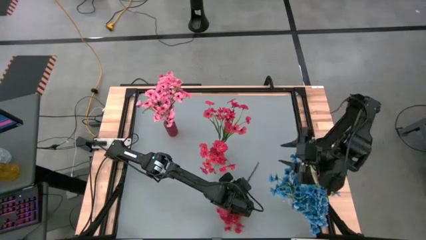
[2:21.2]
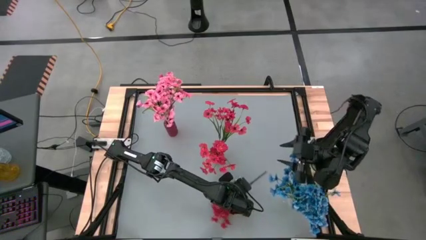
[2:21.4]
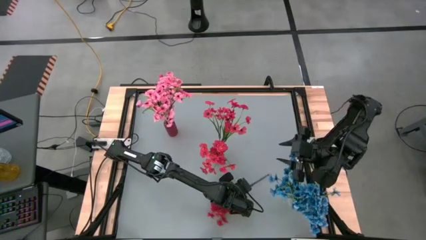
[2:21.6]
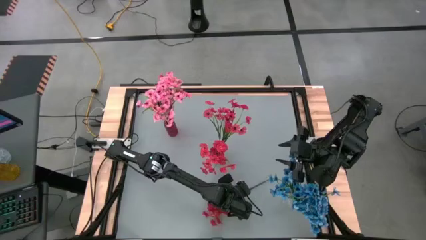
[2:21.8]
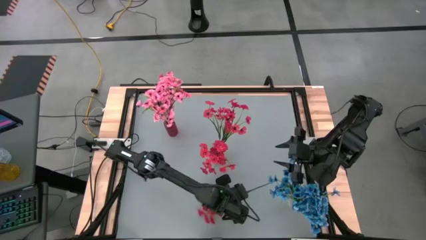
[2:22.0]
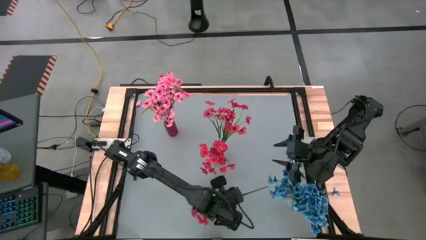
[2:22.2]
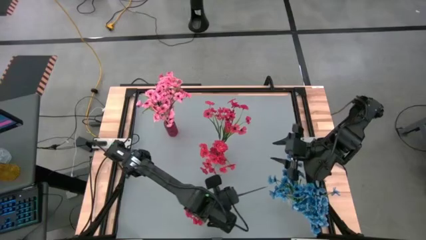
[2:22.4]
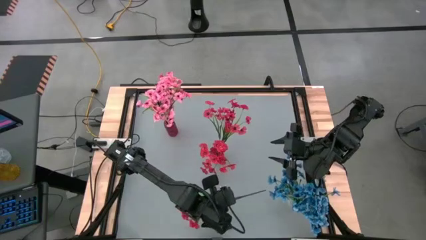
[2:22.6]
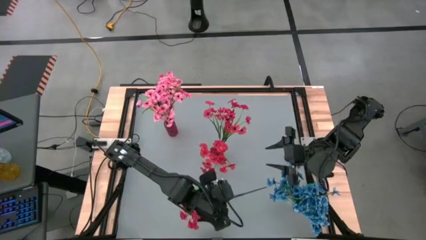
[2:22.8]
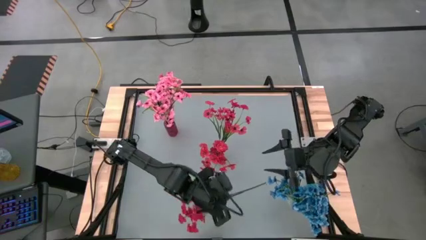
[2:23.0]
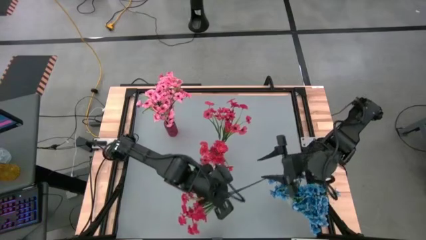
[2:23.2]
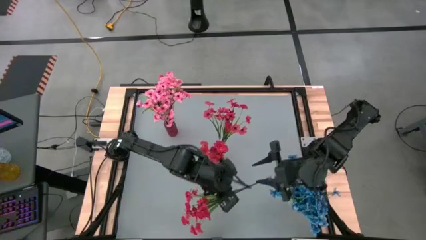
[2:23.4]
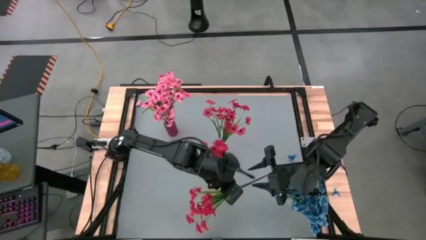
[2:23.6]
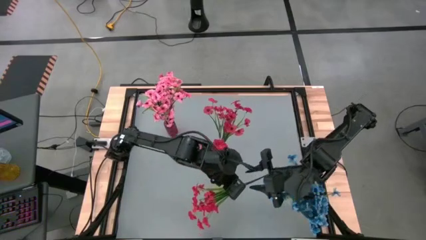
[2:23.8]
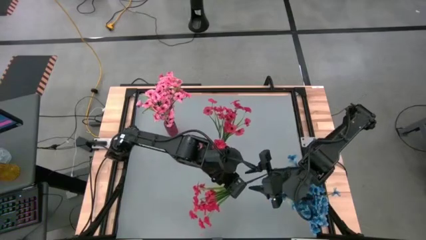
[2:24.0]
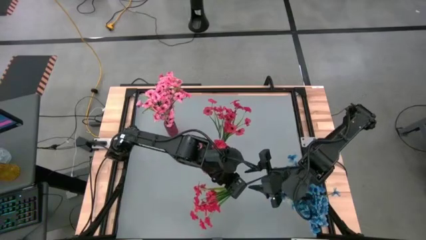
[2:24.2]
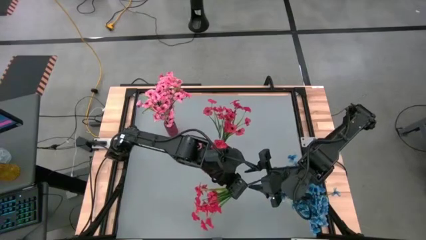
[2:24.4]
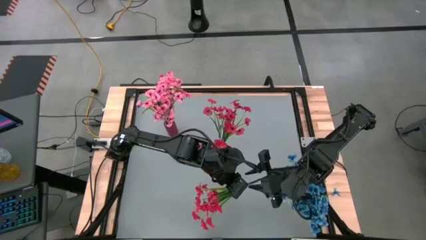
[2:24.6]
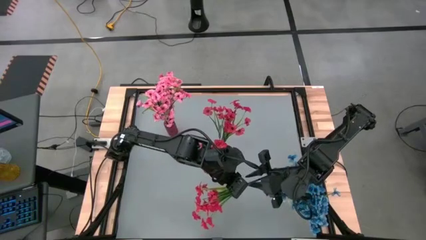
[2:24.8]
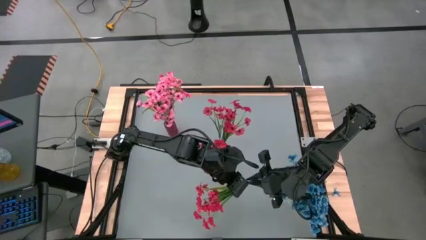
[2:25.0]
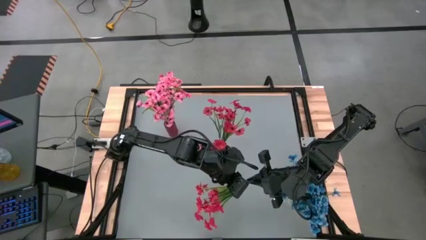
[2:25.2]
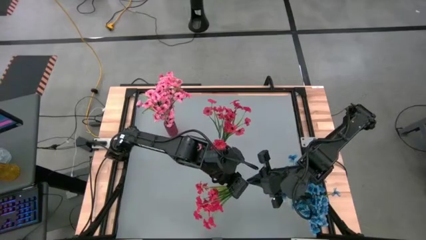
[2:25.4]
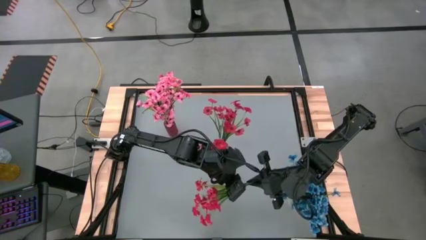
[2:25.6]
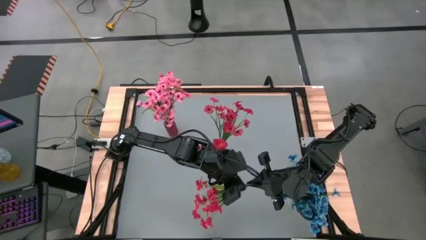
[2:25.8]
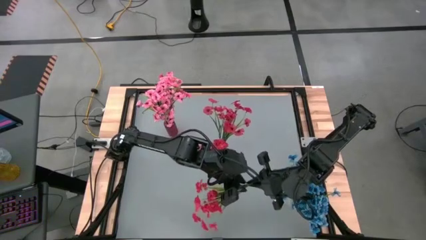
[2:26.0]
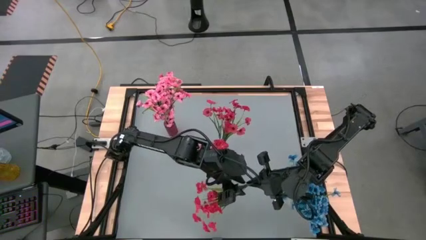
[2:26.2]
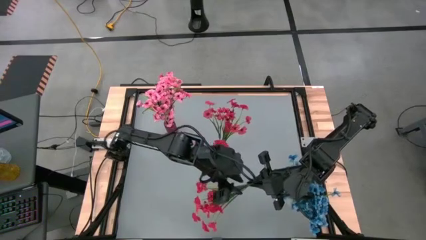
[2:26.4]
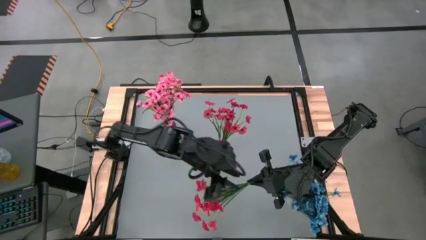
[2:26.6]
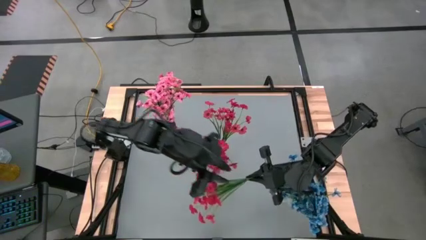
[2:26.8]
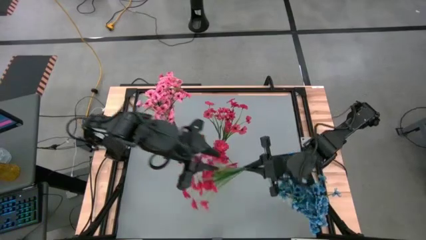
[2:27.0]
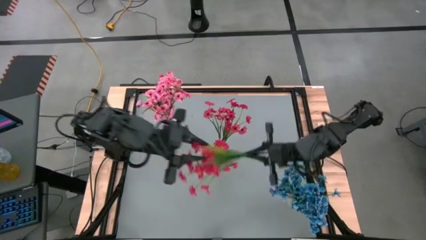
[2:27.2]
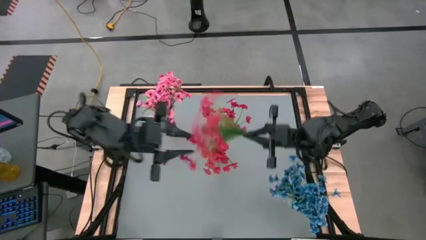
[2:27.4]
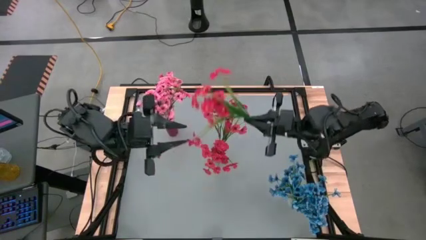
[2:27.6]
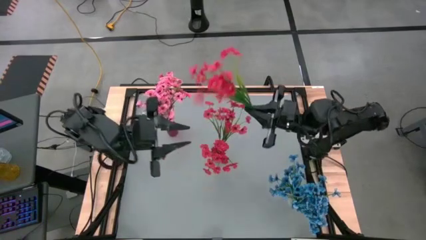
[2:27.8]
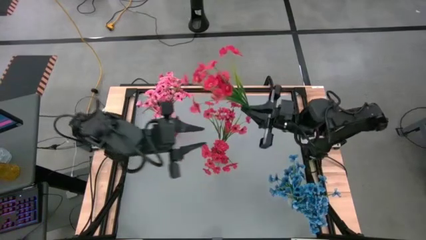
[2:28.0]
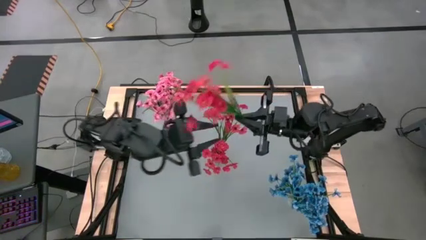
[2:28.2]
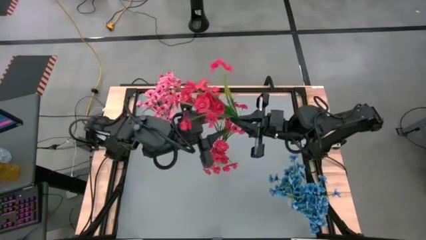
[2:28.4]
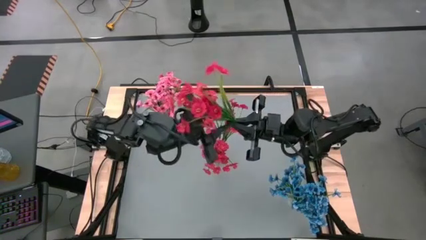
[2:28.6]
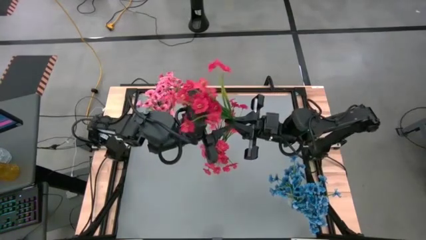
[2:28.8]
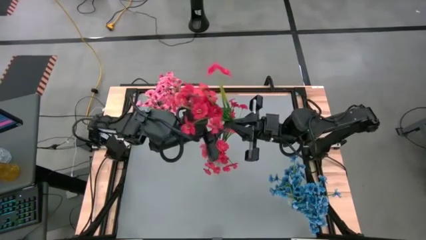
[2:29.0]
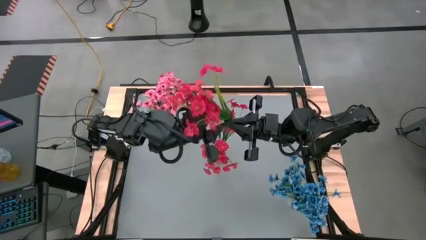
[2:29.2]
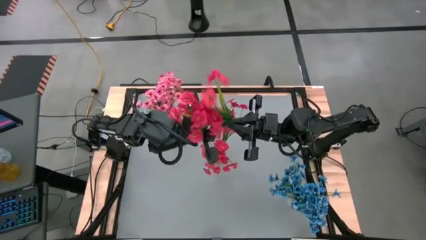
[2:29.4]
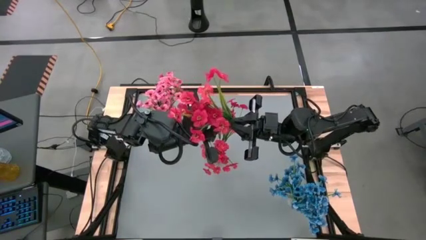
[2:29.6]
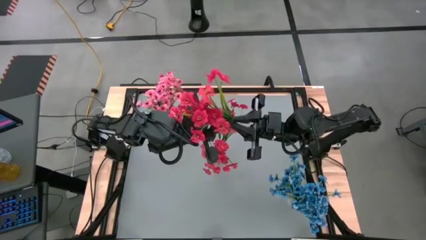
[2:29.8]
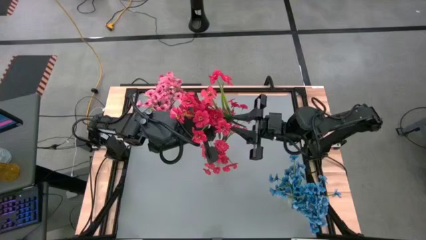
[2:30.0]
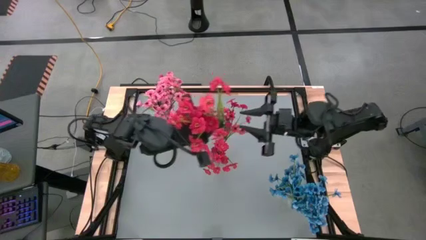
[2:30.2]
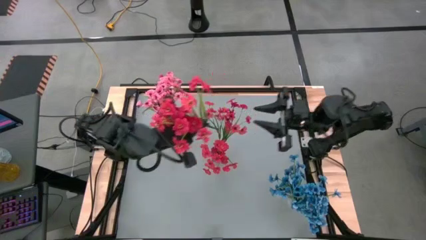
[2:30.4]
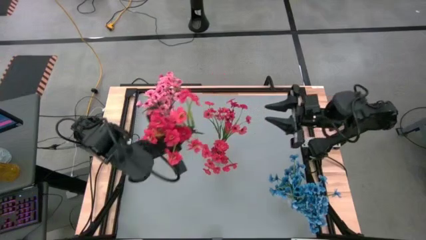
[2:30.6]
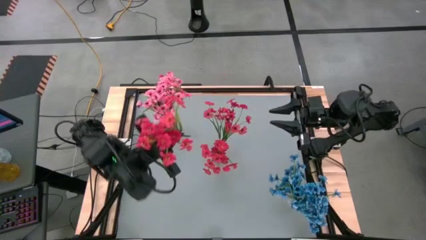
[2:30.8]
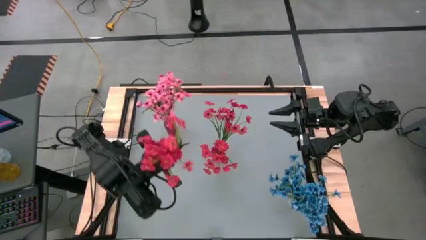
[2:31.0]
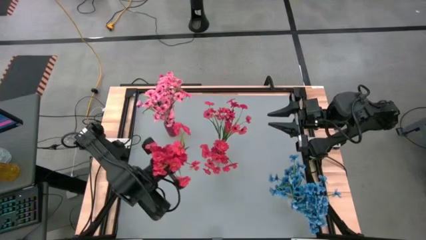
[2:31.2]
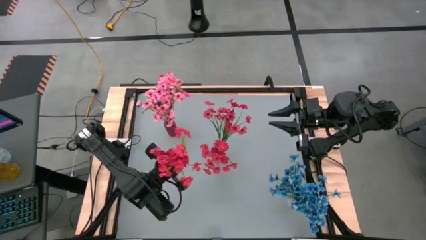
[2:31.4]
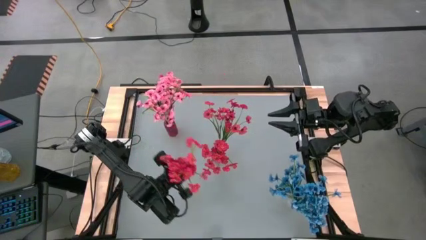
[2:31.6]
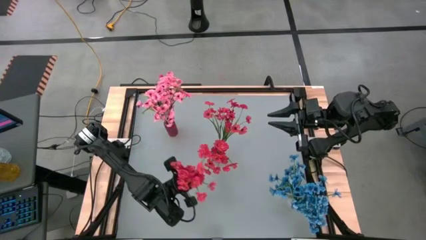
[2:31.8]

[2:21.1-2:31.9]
Task: Sort flowers into vase by color
Put the red flowers into the pink vase

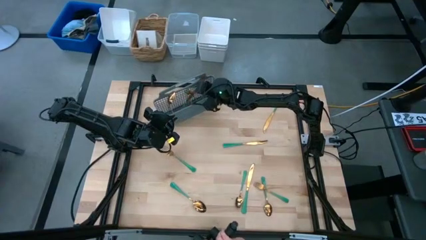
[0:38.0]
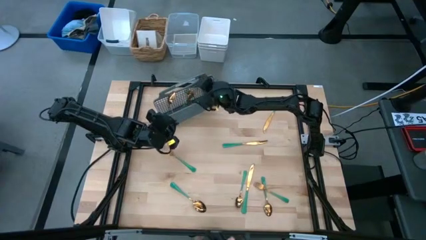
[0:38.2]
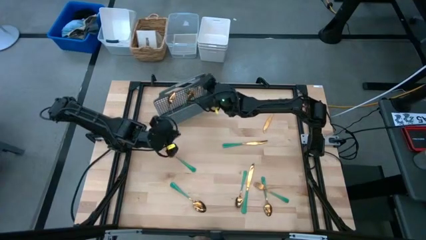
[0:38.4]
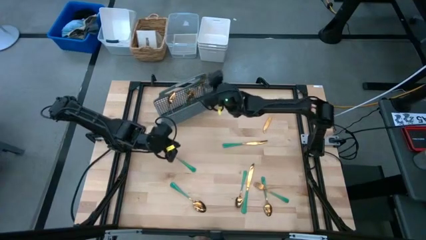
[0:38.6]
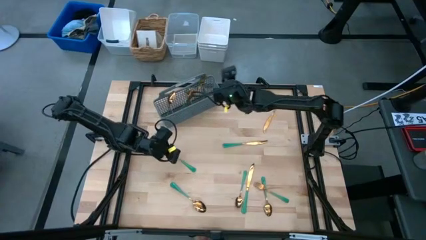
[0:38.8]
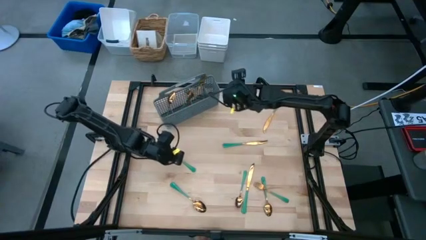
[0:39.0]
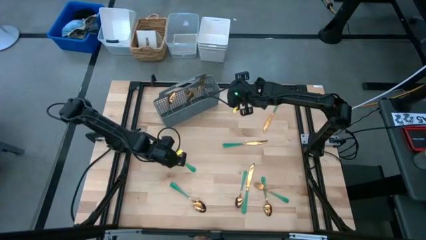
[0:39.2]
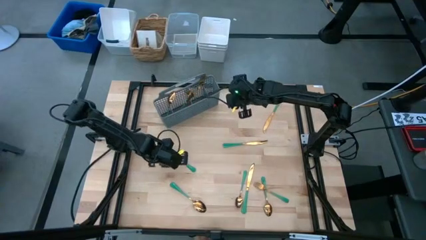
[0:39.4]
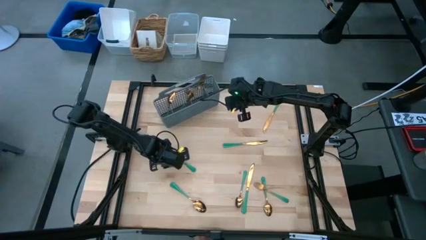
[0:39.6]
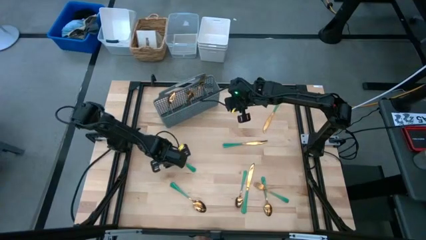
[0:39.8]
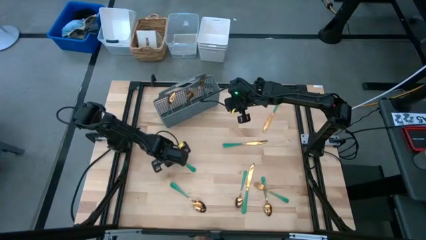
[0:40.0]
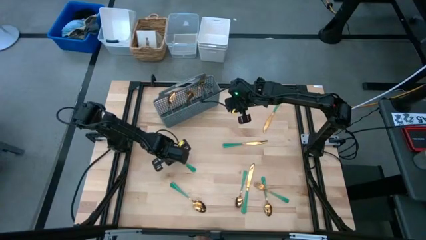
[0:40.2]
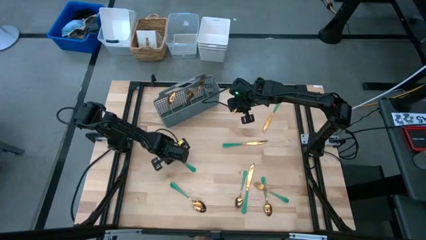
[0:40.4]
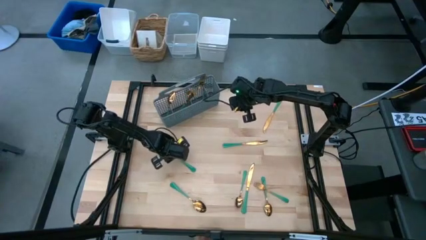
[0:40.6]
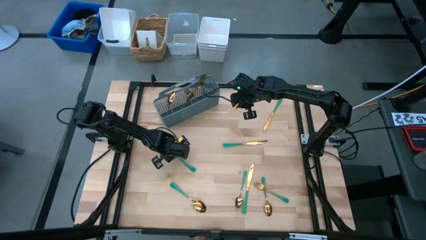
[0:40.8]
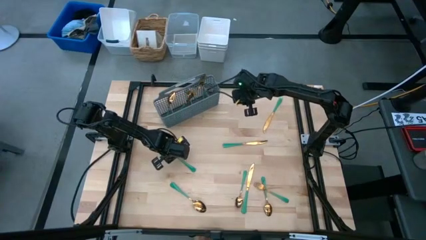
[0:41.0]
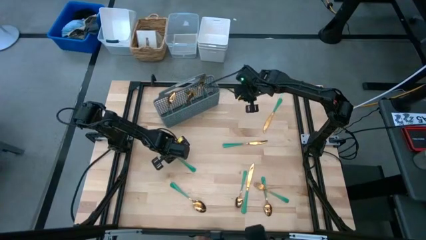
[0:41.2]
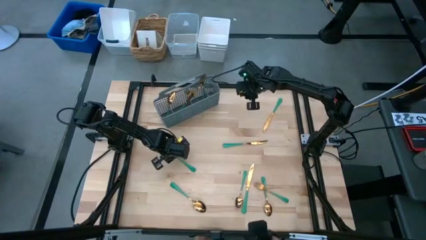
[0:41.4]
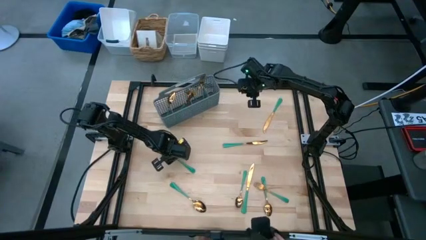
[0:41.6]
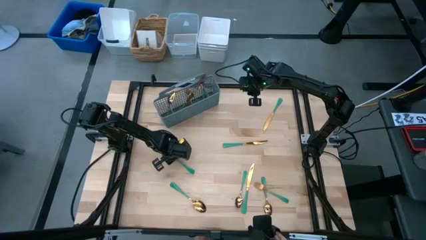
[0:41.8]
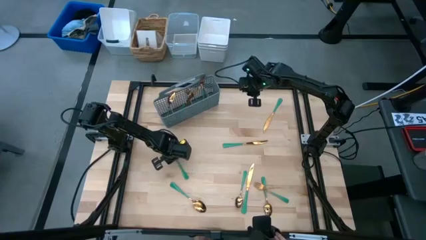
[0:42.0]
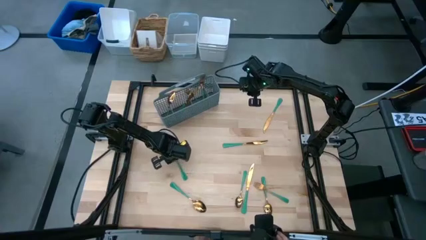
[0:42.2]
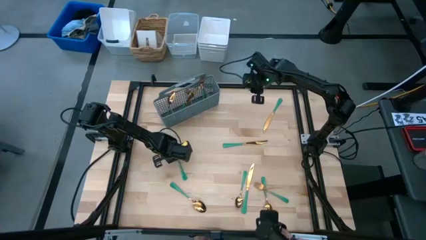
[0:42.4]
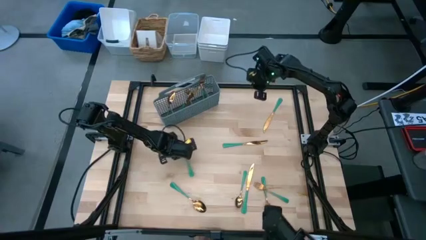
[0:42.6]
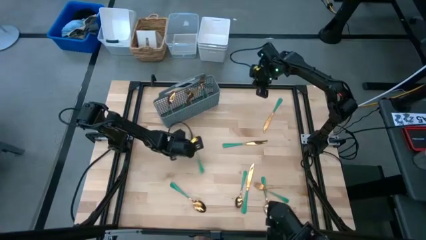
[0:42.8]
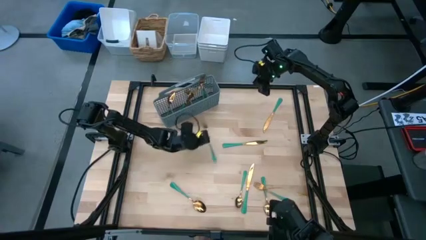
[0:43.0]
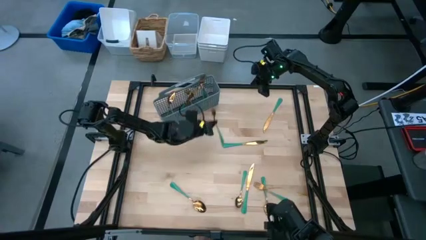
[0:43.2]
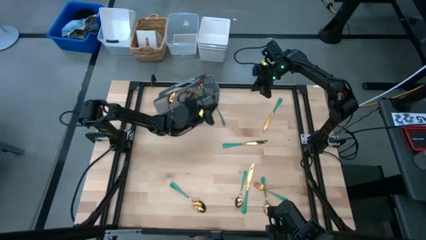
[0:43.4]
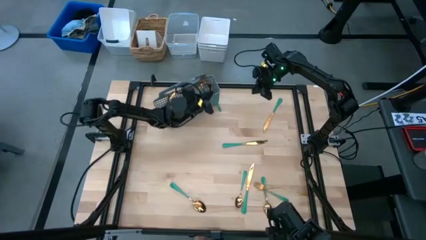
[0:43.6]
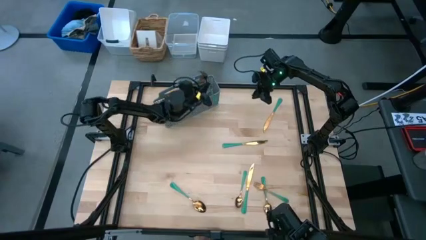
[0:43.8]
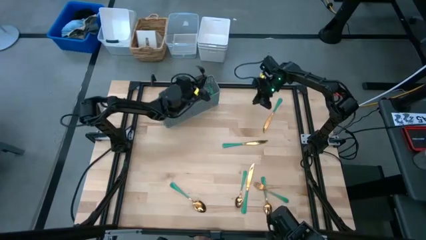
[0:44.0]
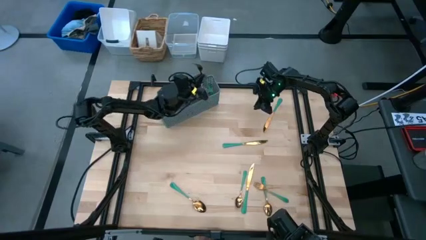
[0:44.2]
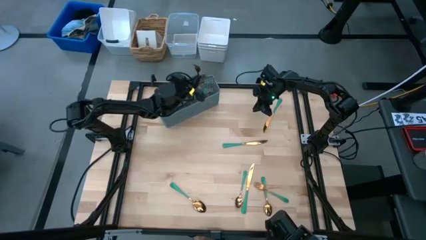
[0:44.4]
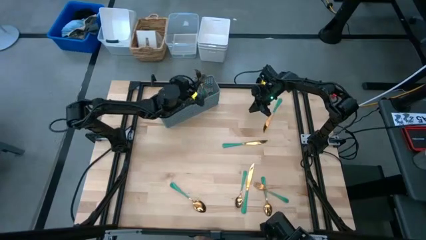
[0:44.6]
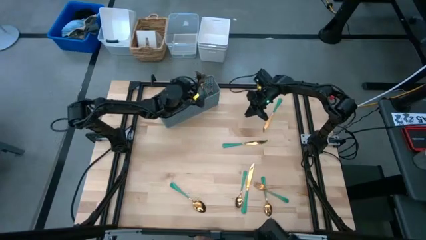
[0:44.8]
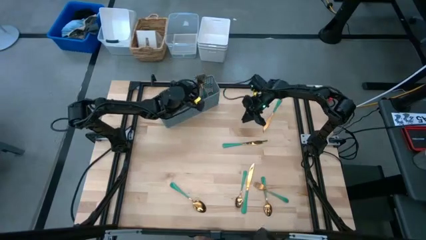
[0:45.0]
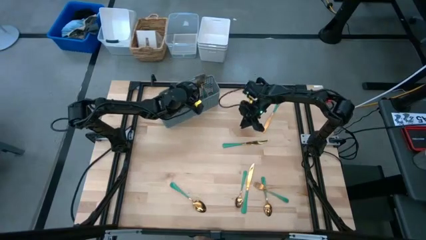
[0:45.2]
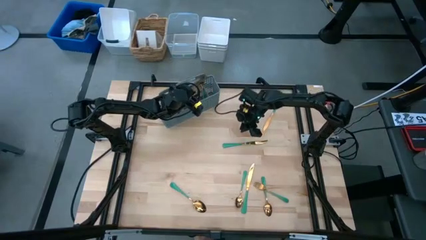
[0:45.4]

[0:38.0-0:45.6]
Task: Sort silverware
Put the fork into the middle right section of the silverware holder
